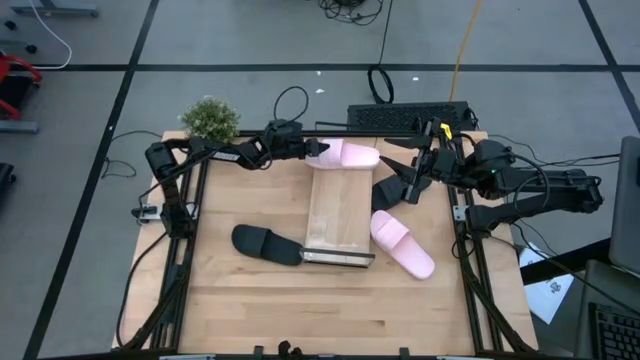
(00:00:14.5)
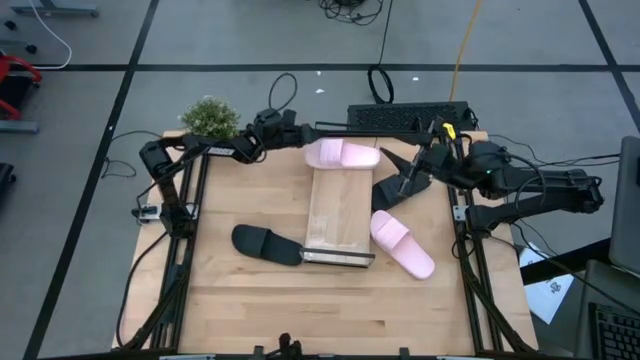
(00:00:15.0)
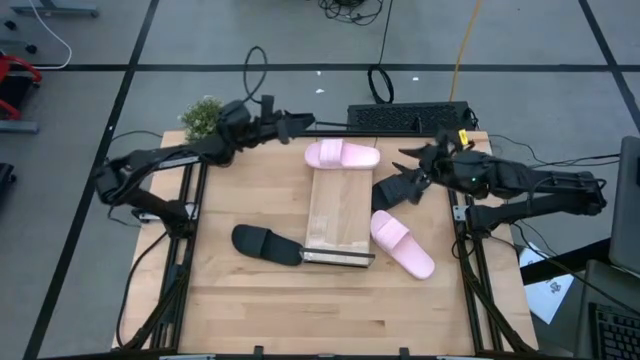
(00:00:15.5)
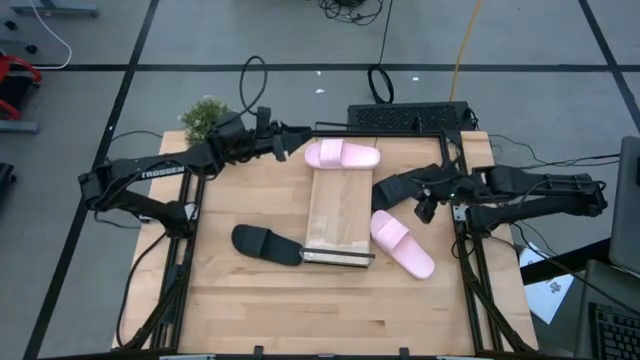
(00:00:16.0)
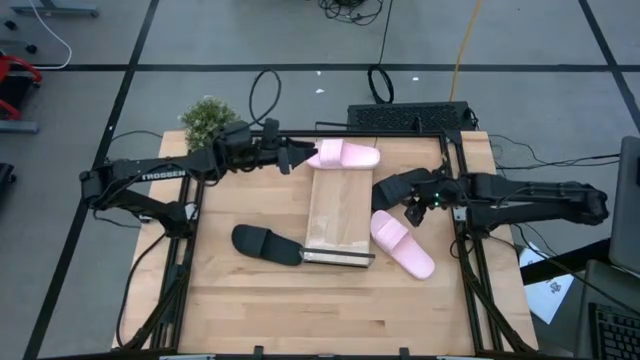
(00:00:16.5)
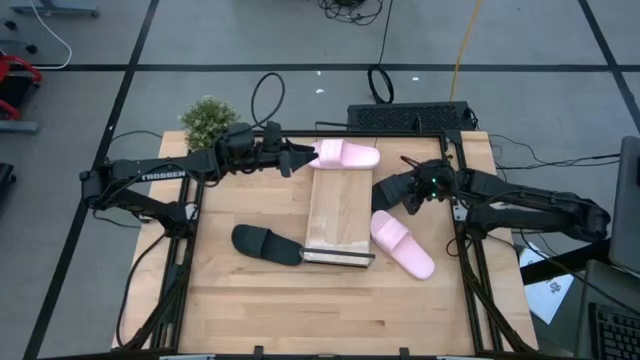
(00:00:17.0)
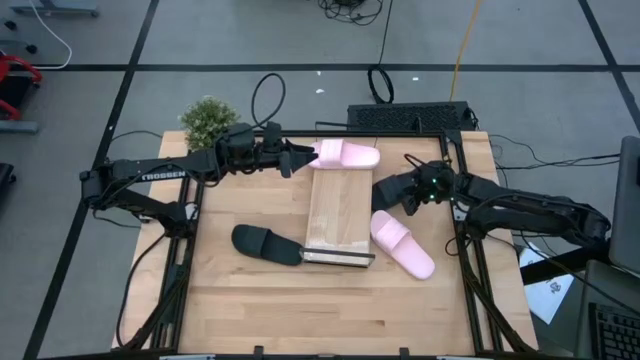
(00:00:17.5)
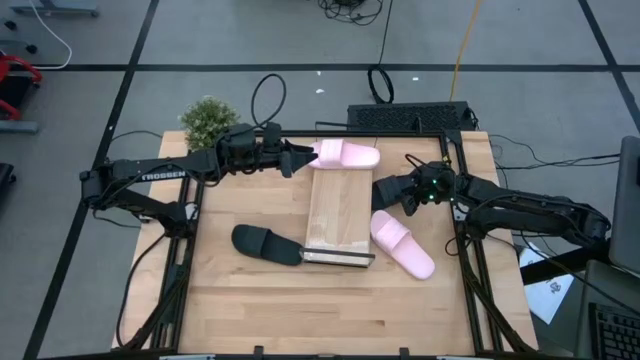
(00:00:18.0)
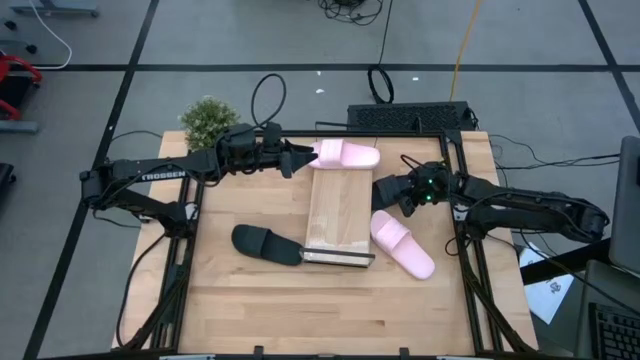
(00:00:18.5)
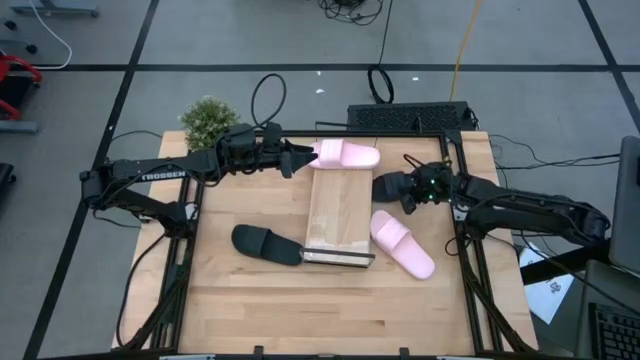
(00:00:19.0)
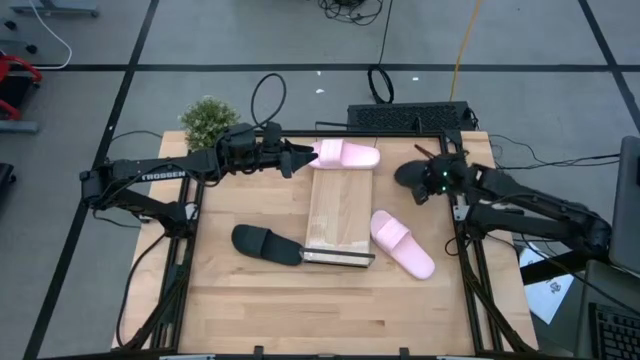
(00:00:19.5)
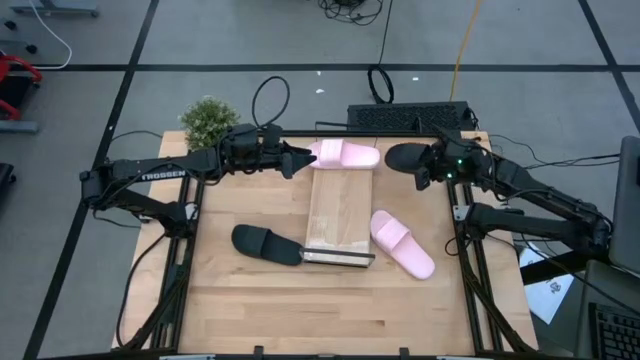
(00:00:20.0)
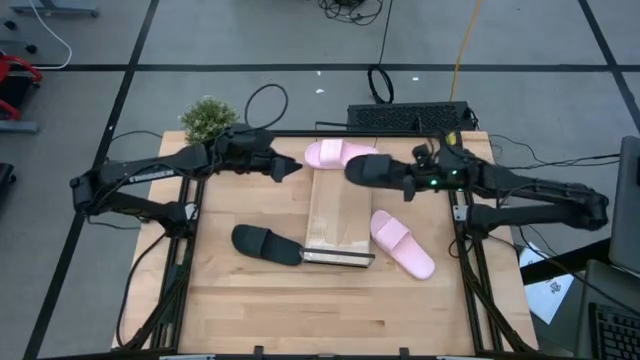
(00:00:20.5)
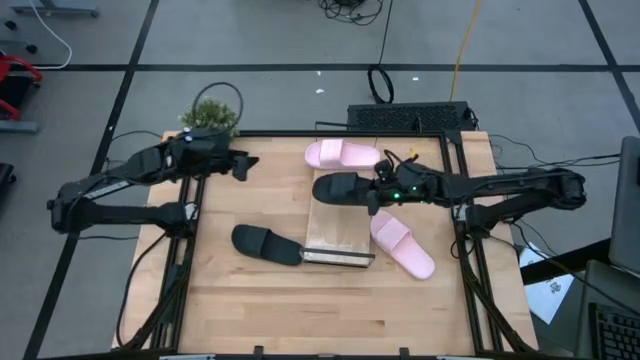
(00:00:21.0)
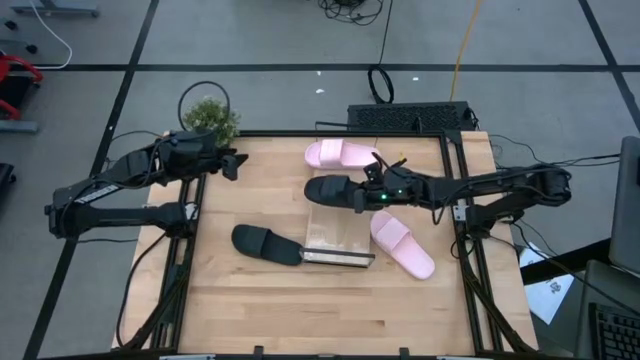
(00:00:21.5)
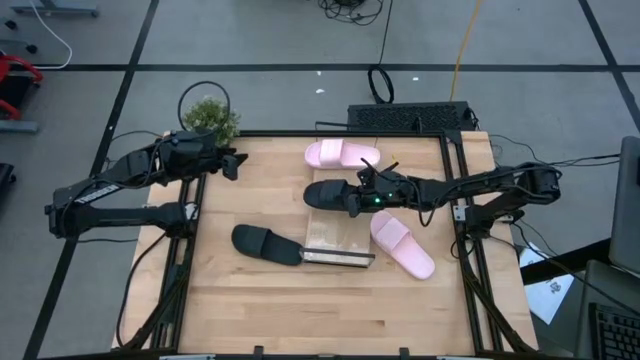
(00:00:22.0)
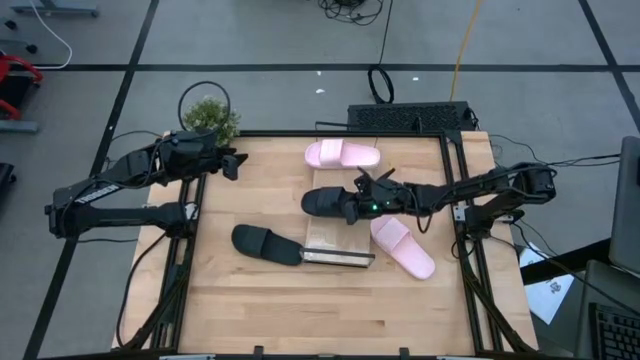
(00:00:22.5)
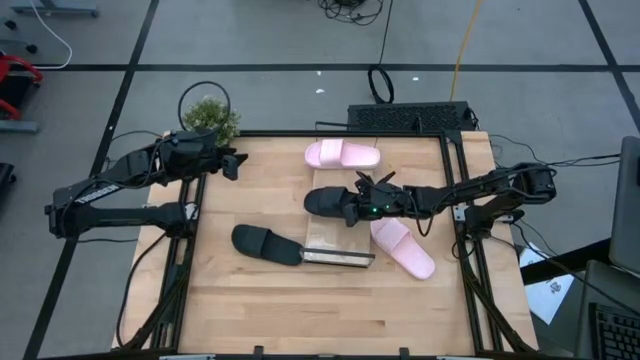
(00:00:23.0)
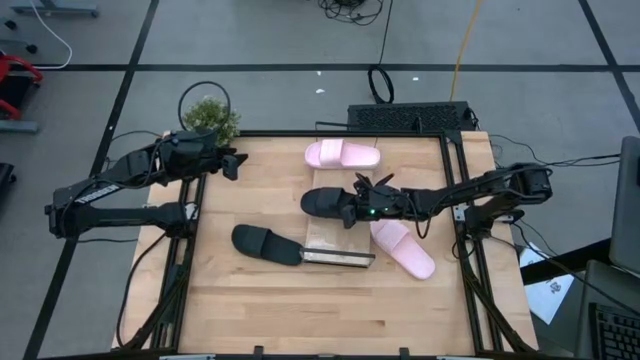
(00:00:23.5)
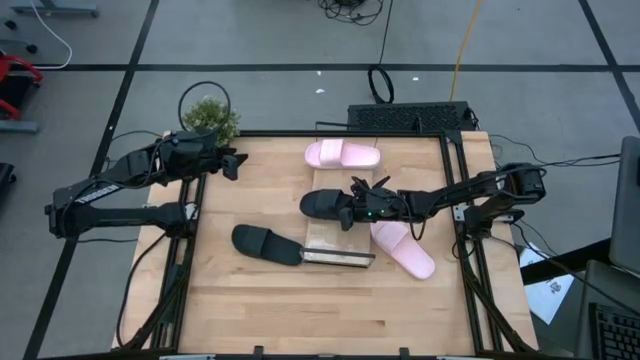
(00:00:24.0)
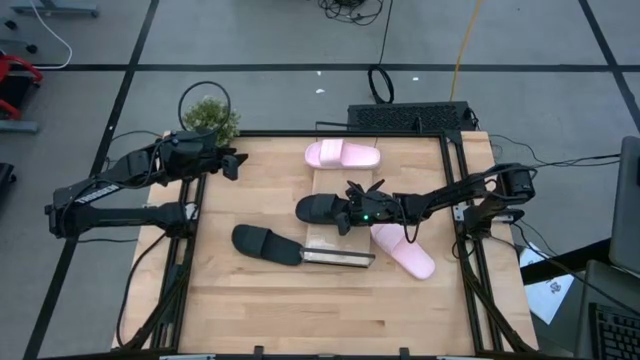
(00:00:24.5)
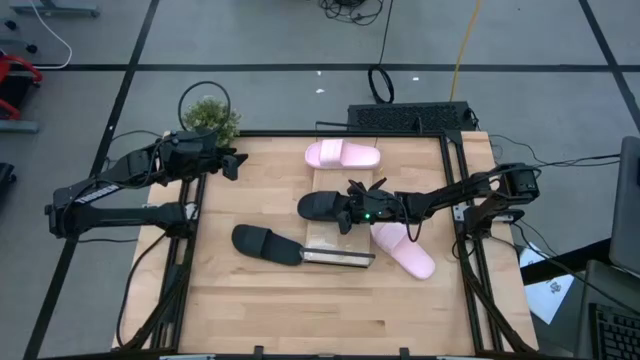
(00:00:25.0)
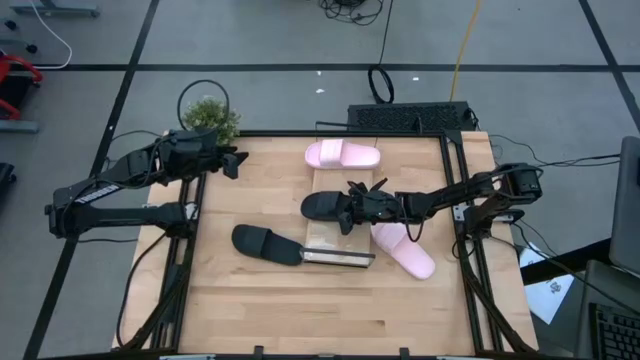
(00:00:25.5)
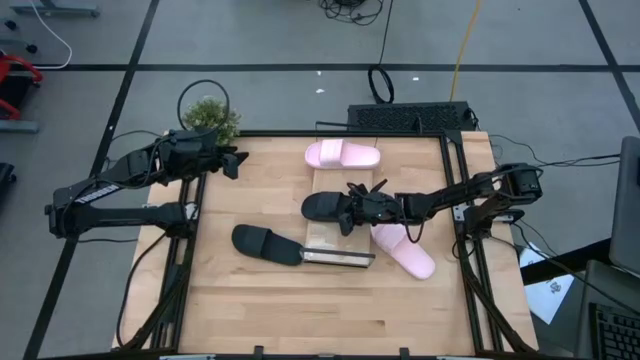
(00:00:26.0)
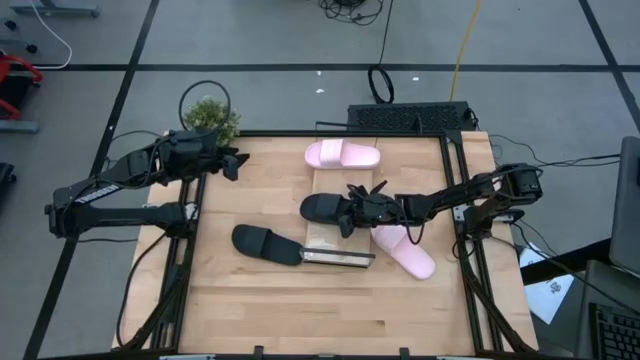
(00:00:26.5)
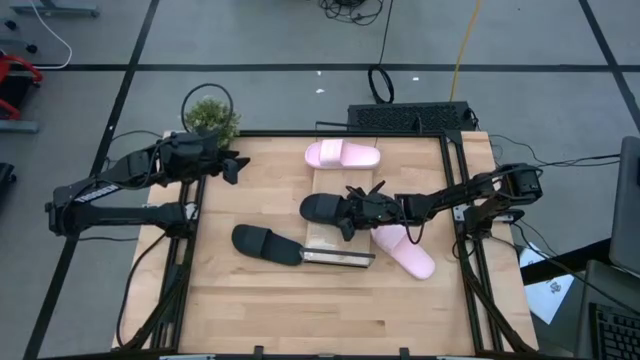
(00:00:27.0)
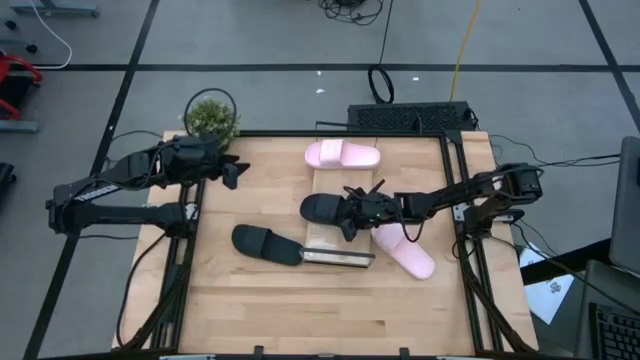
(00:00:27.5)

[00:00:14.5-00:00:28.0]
Task: Pick and place slides into the shelf
Put the right black slipper on the shelf

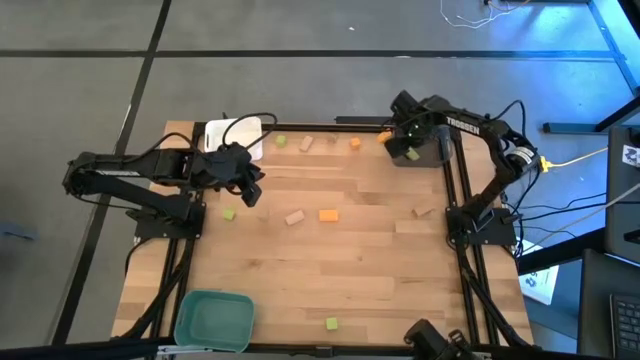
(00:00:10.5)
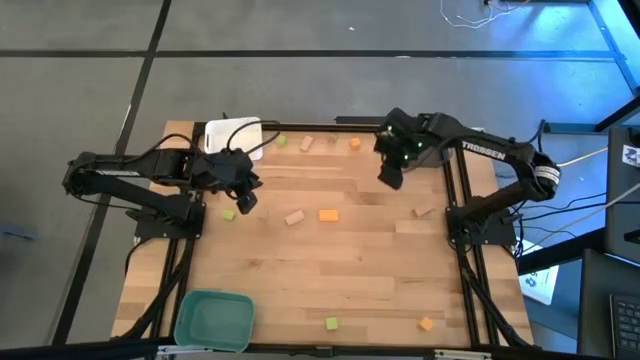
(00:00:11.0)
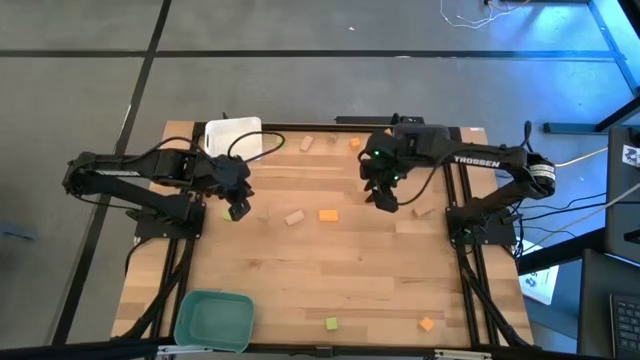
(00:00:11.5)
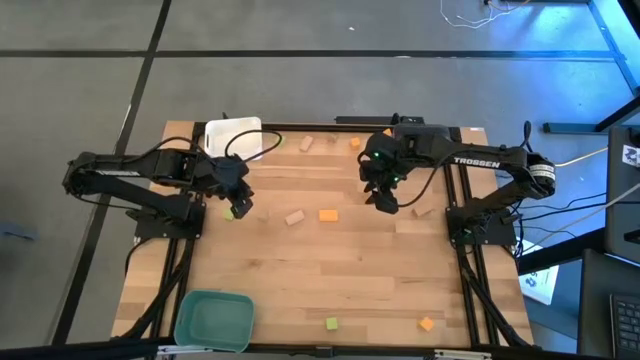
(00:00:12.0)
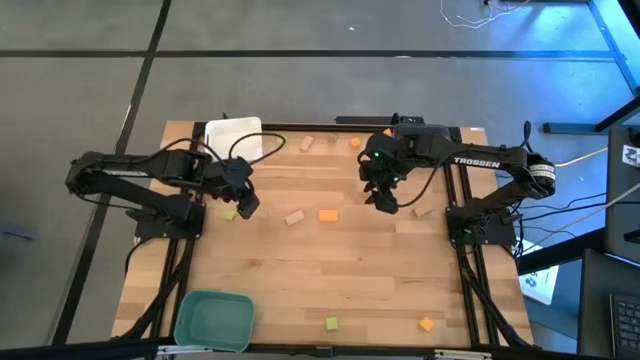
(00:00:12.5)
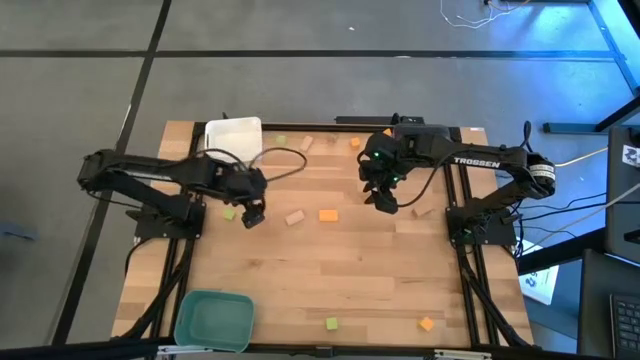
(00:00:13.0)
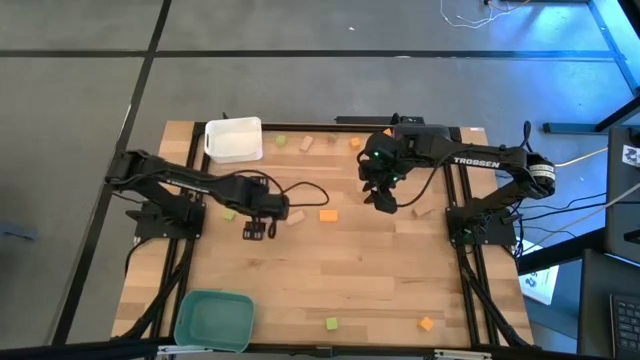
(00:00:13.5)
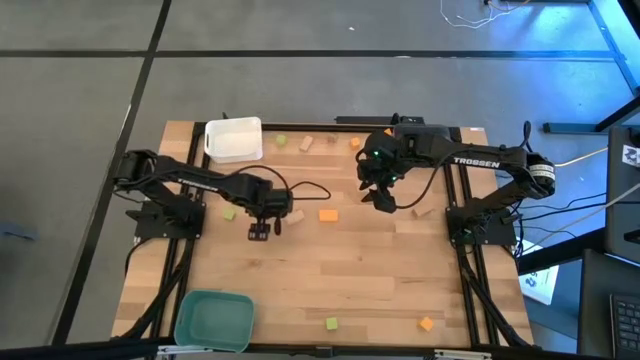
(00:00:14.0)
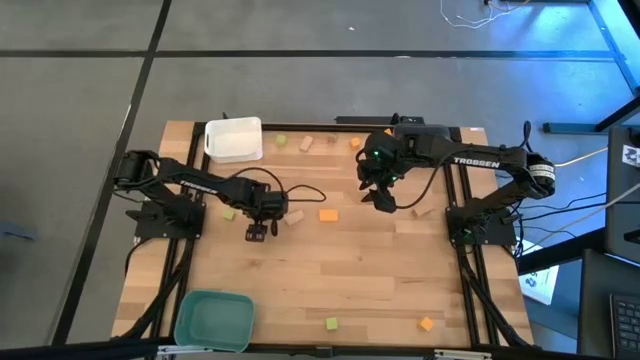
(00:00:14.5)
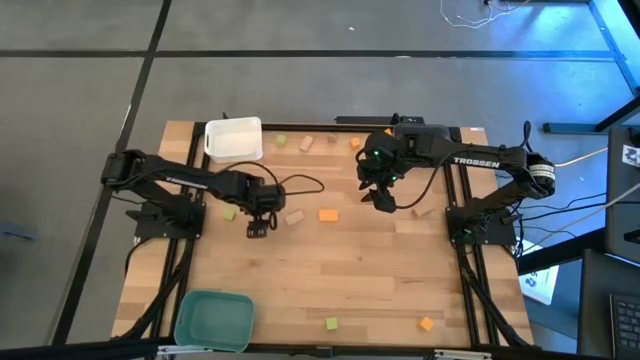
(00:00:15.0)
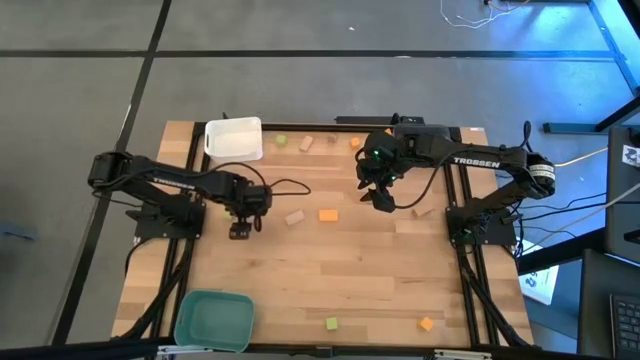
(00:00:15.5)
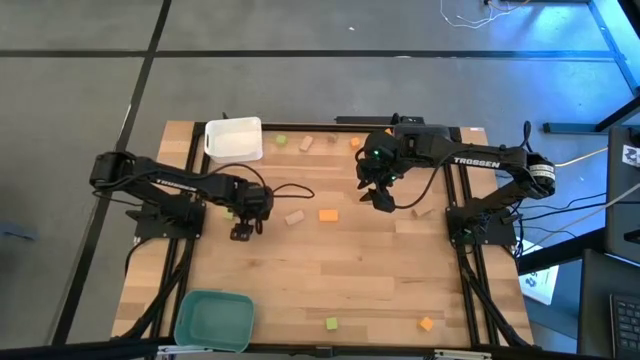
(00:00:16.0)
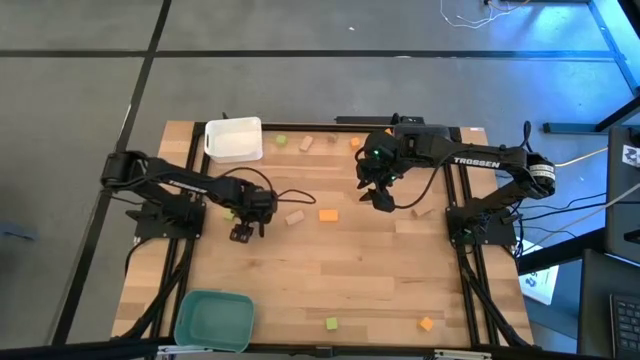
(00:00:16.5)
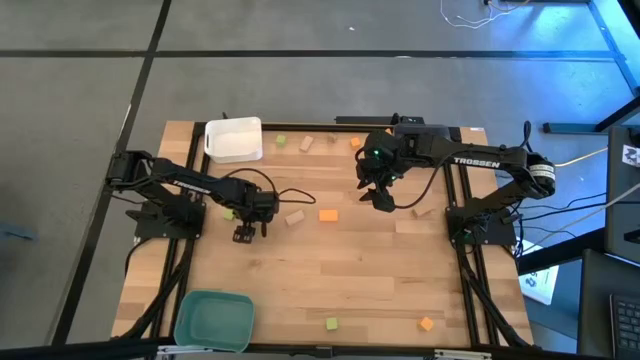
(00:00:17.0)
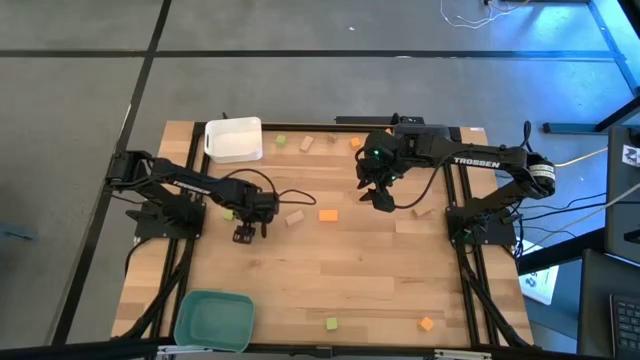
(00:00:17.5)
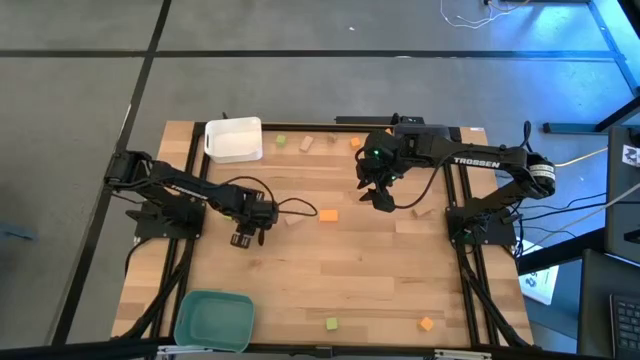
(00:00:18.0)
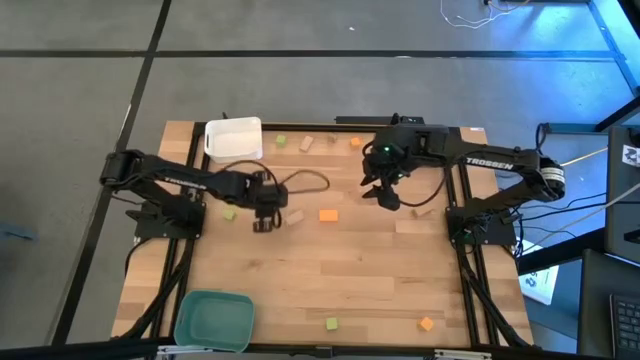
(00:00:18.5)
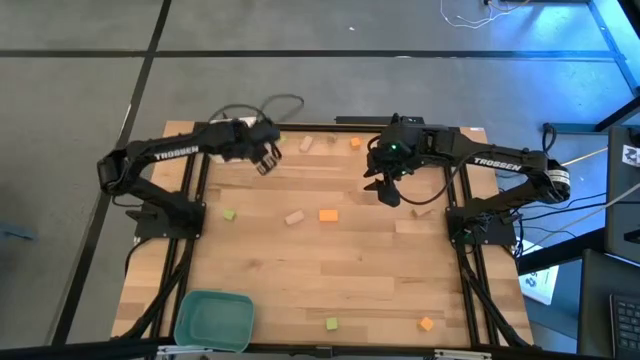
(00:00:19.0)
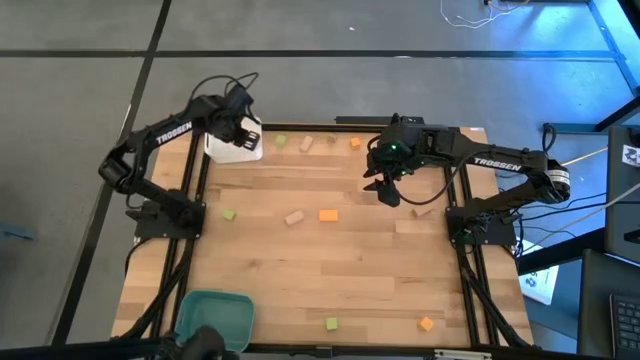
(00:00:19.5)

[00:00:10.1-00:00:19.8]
Task: Sort & place blocks by color
Put the brown block into the white bin
